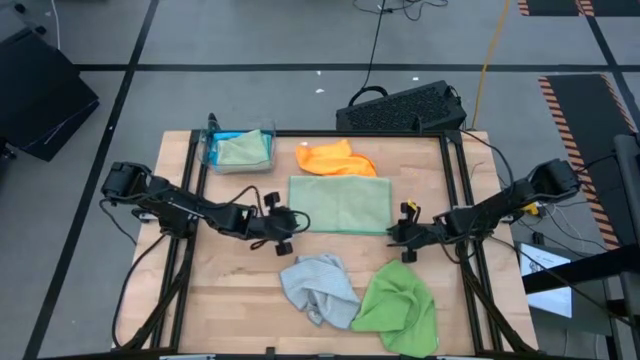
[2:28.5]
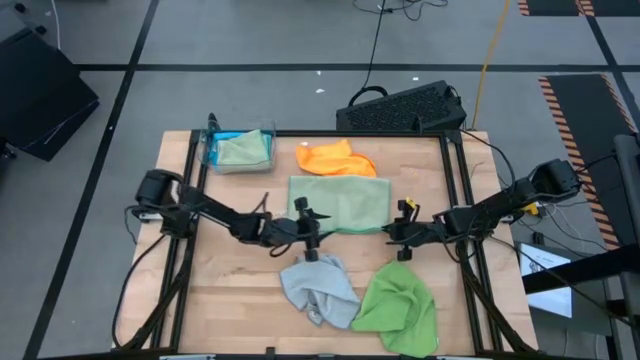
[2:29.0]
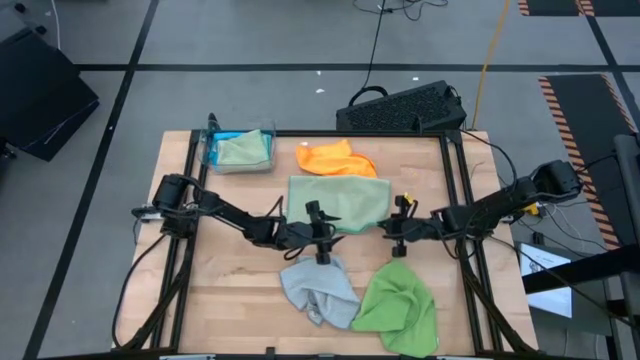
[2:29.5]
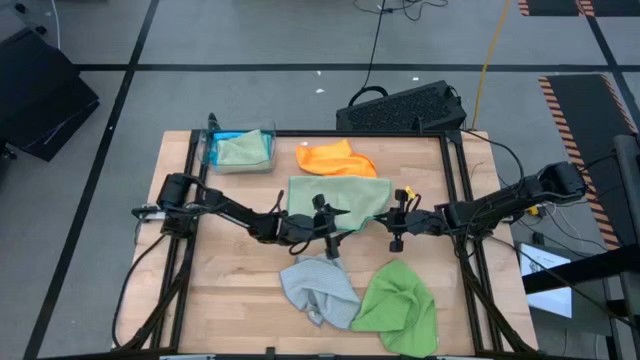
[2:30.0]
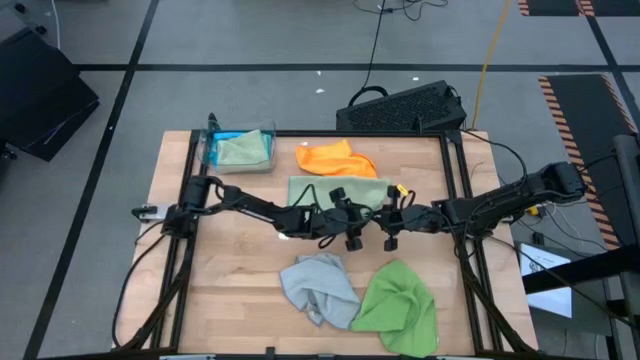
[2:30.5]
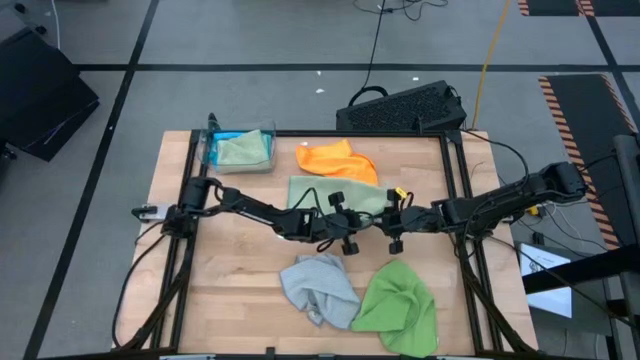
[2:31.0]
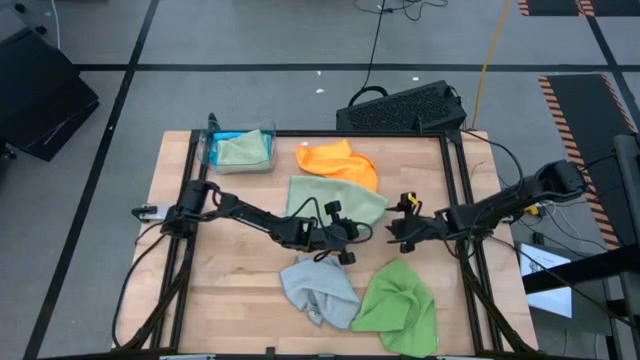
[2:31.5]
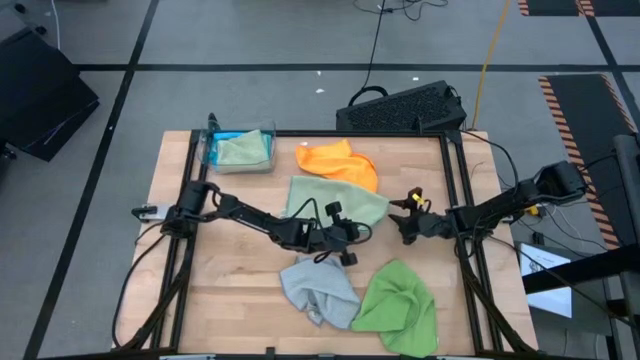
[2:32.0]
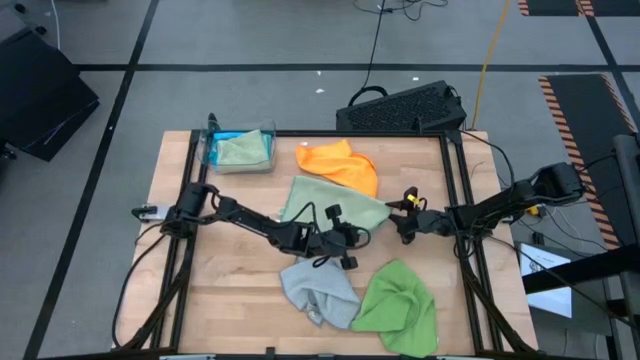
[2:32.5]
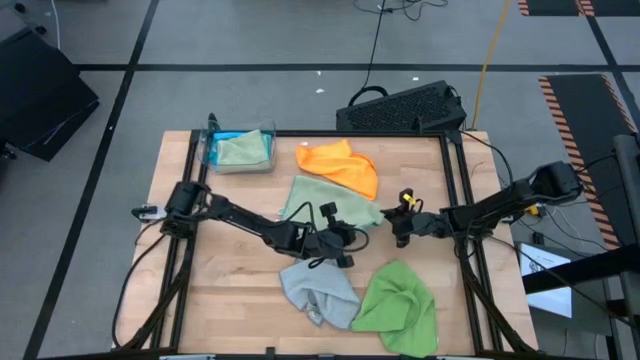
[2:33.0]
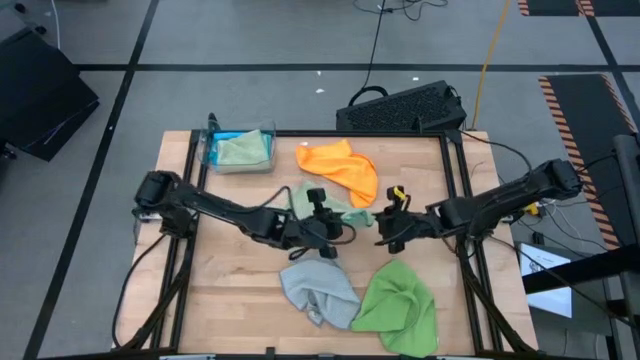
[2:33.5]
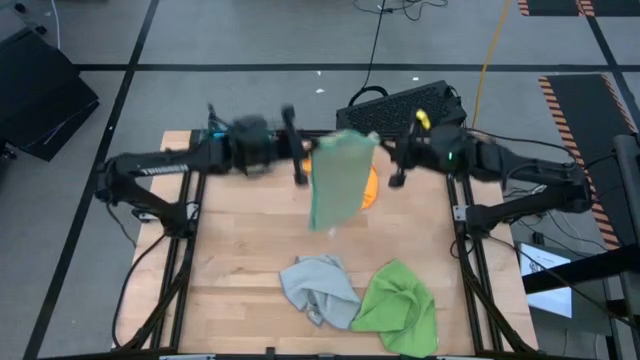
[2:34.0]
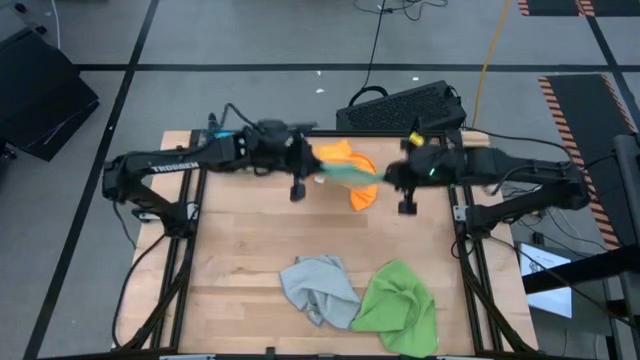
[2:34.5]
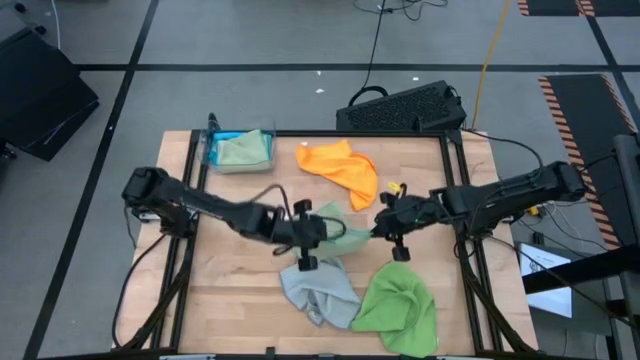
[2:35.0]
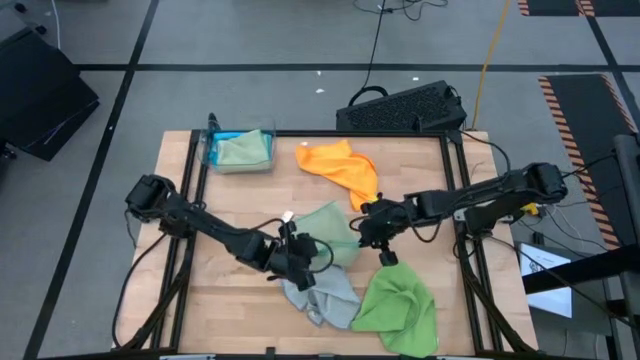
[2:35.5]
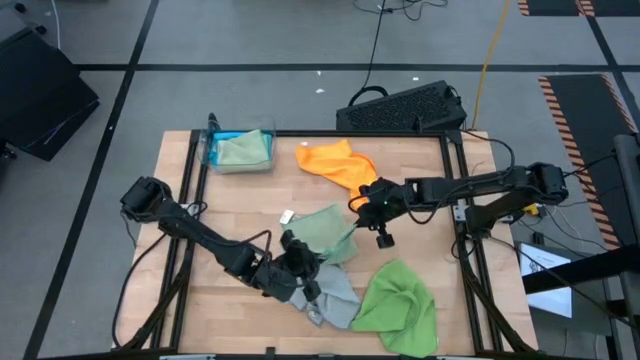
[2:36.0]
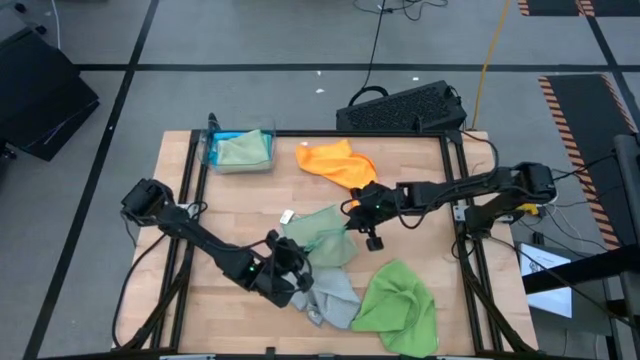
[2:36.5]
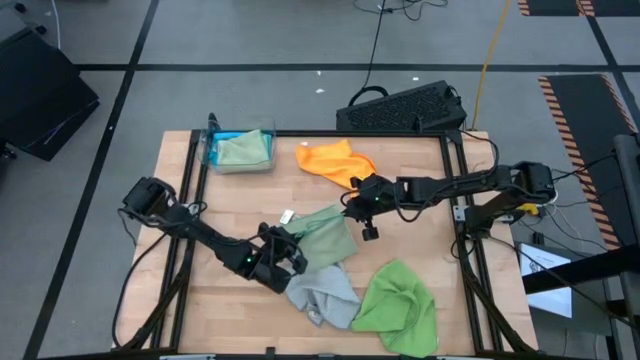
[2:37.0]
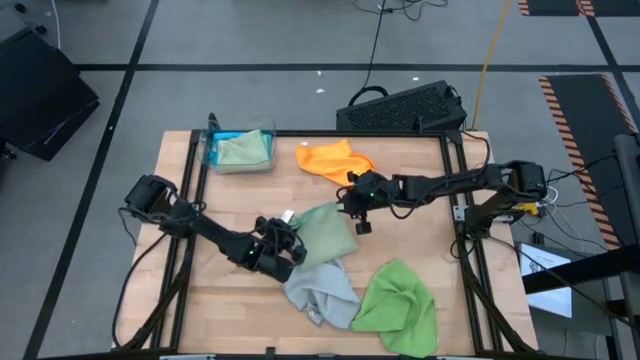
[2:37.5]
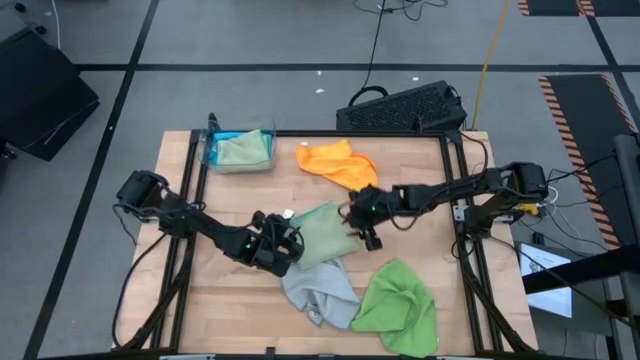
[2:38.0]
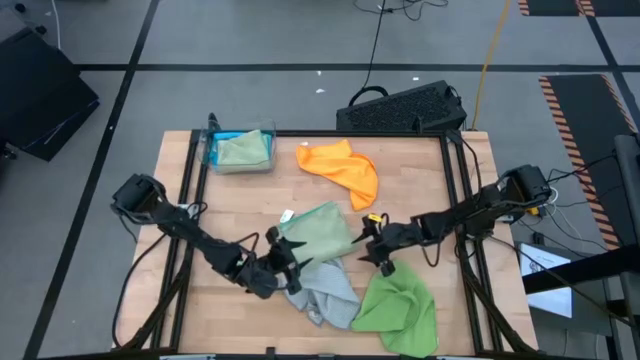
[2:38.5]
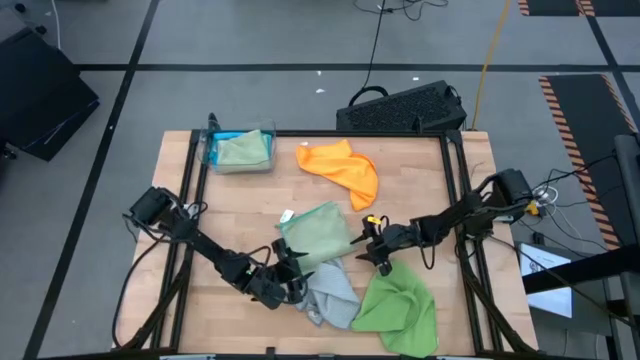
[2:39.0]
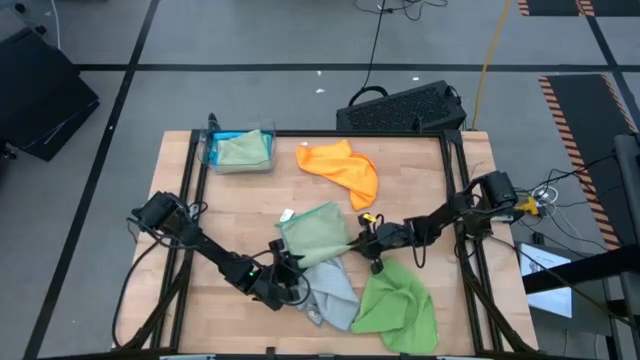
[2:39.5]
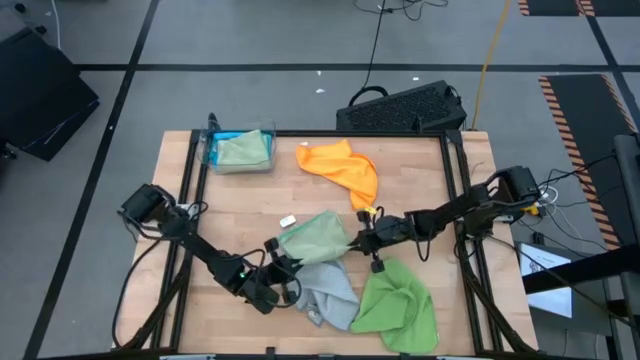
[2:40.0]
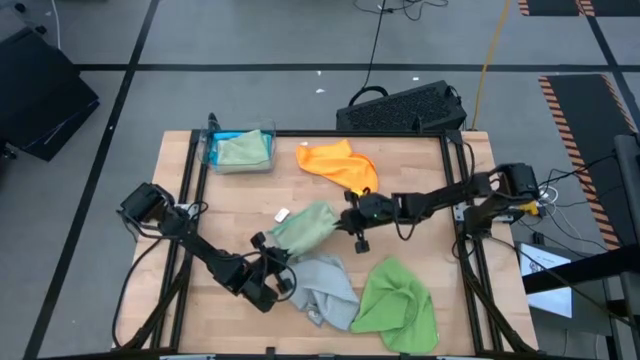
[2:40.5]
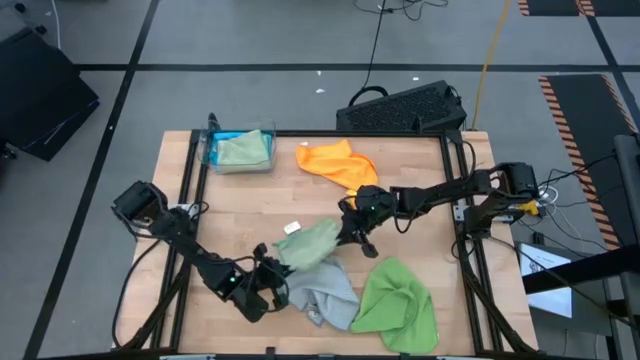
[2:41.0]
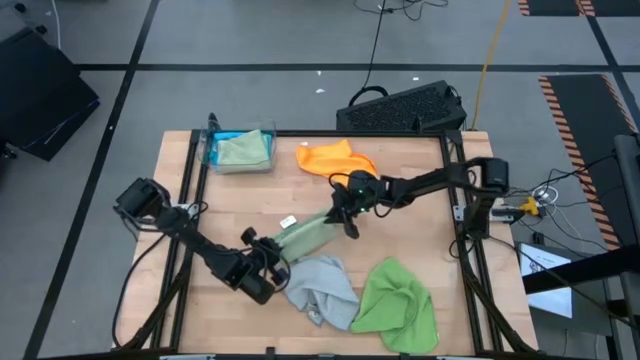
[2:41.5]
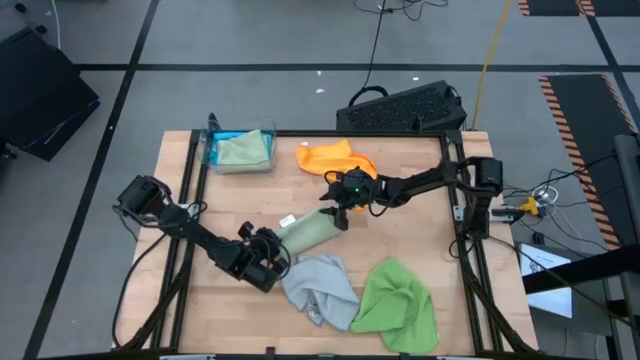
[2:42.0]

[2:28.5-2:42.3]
Task: Fold microfiber towels
Fold the light green microfiber cloth

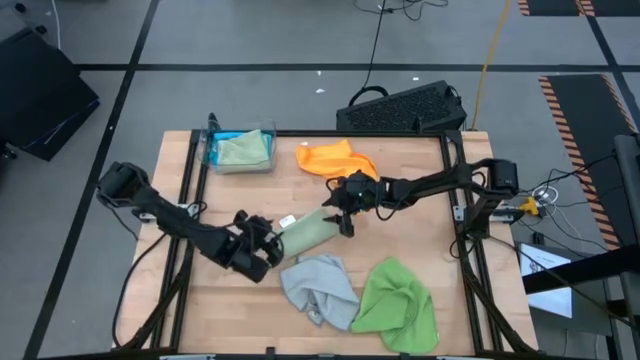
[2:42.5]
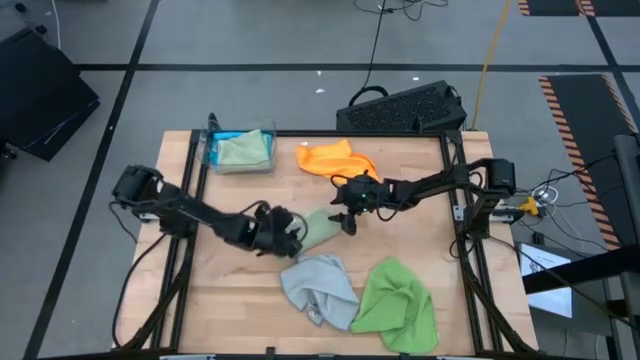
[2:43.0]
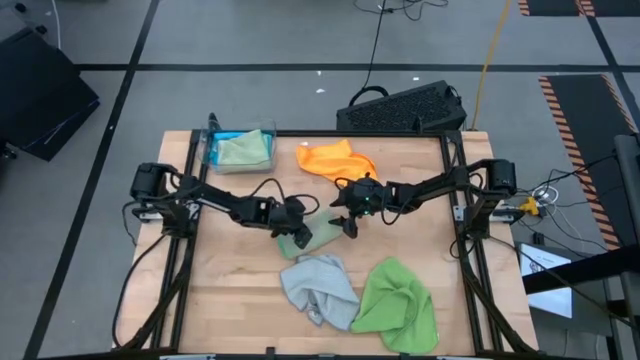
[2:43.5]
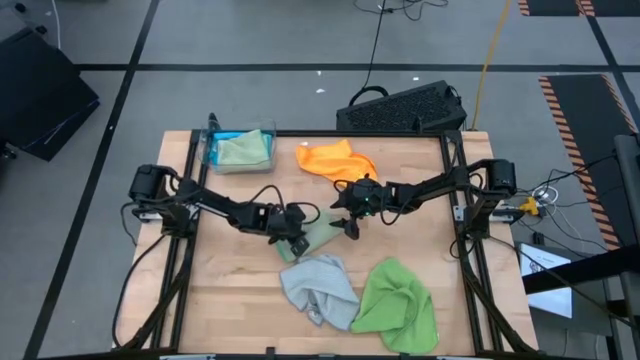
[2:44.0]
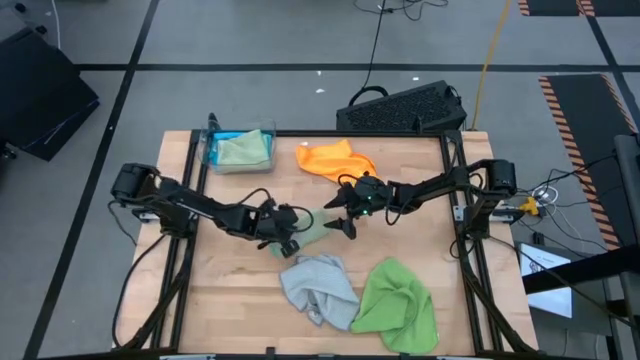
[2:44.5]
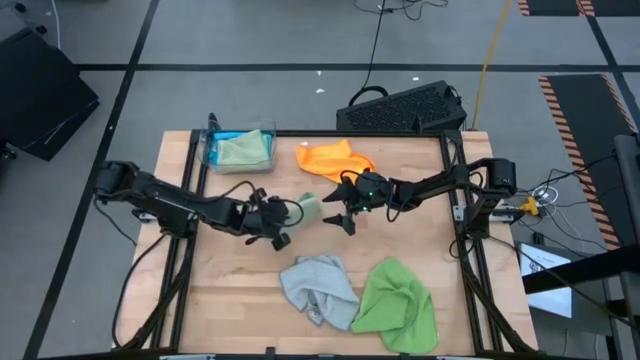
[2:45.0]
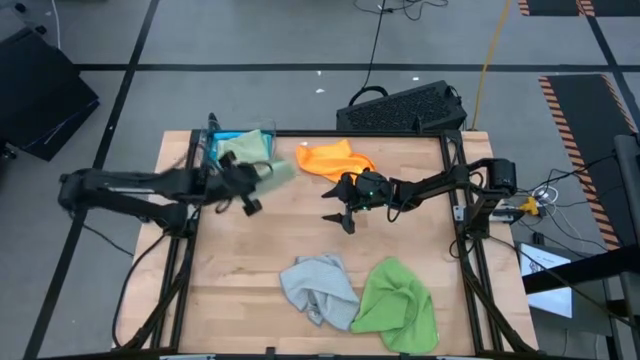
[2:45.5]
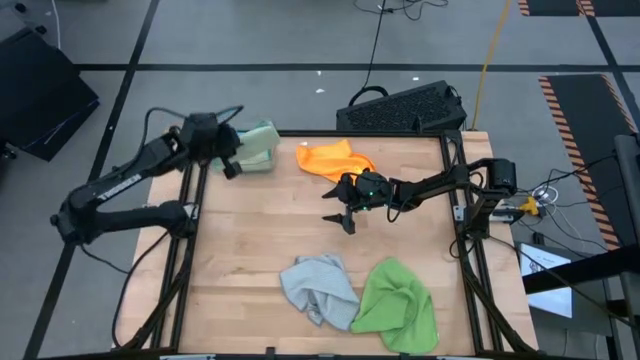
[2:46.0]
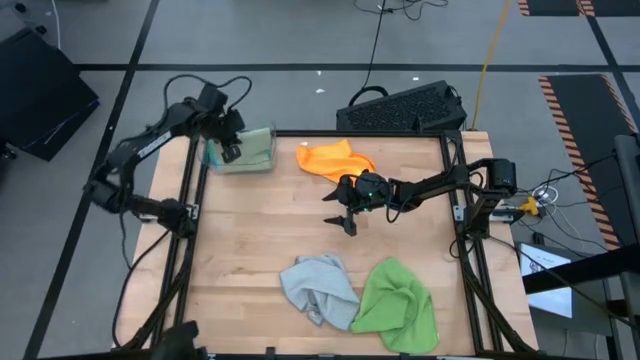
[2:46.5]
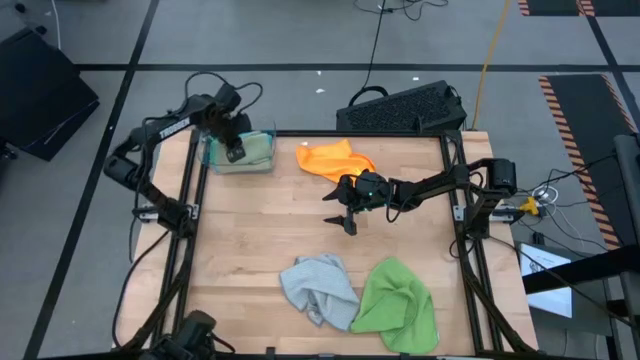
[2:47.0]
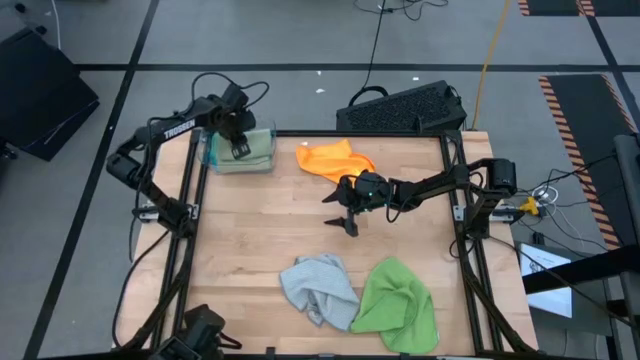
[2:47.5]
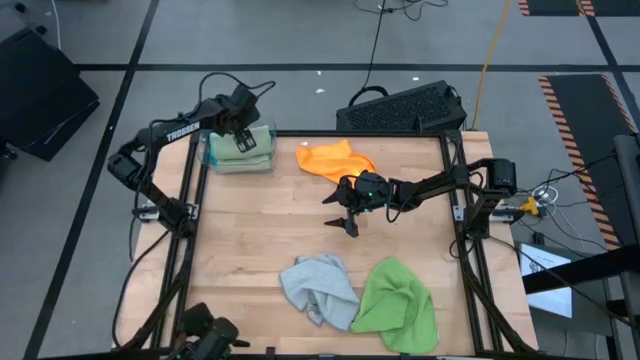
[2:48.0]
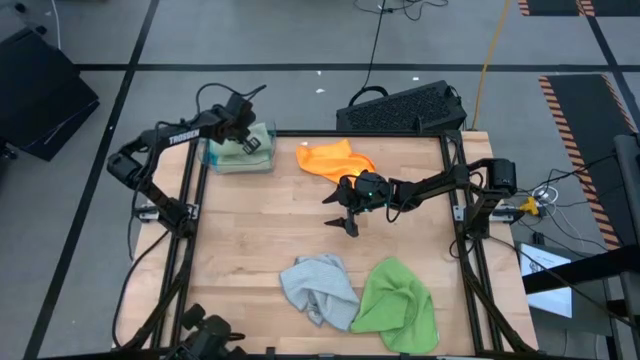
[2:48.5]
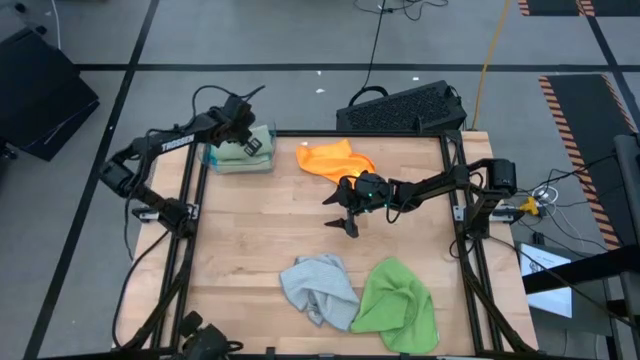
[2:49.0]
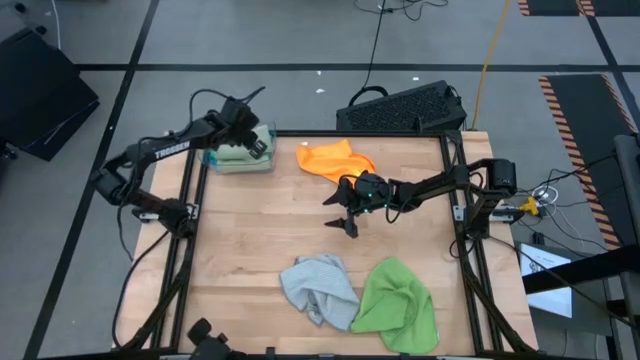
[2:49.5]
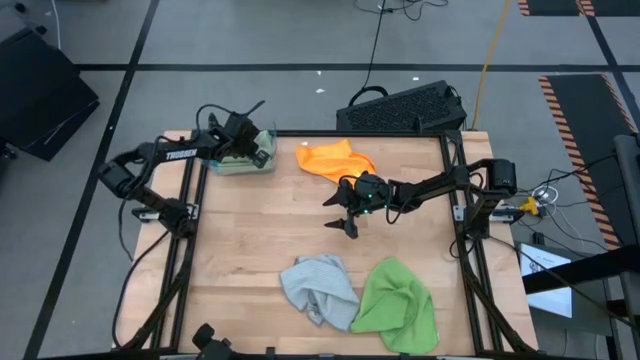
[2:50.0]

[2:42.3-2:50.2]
Stack the light green microfiber cloth on top of the light green microfiber cloth
